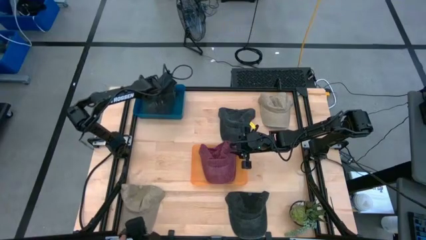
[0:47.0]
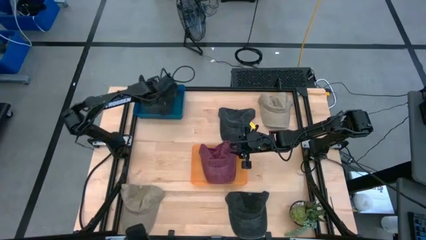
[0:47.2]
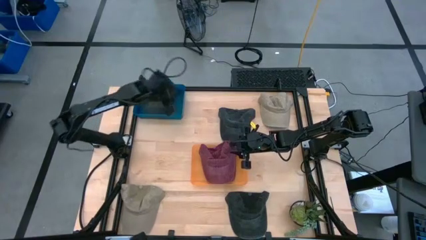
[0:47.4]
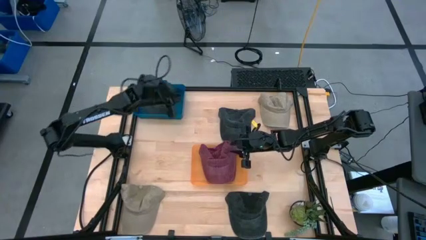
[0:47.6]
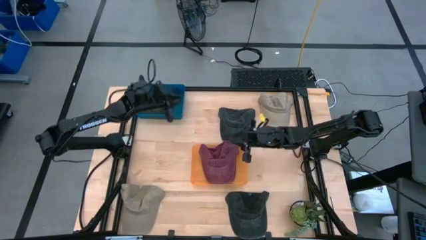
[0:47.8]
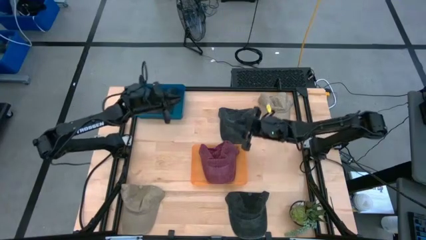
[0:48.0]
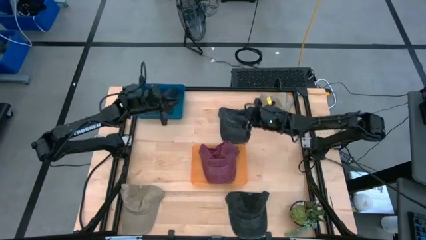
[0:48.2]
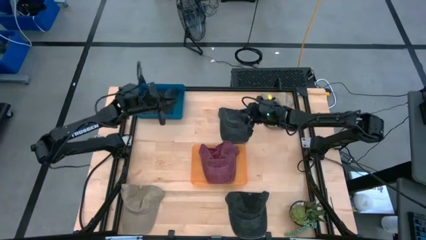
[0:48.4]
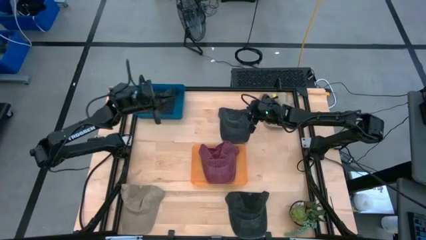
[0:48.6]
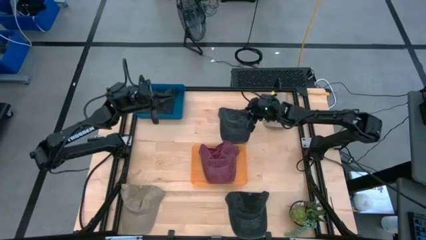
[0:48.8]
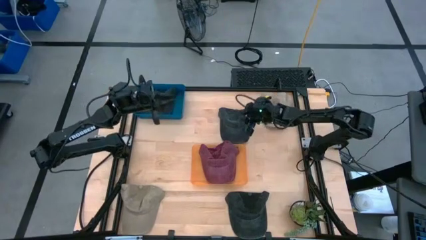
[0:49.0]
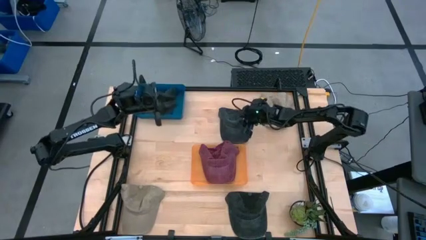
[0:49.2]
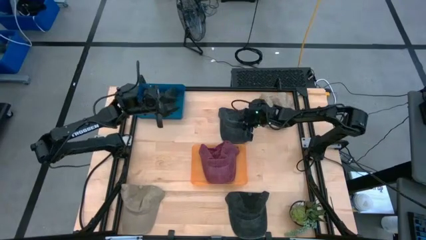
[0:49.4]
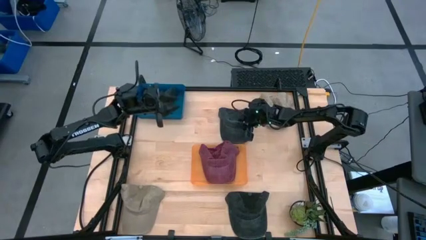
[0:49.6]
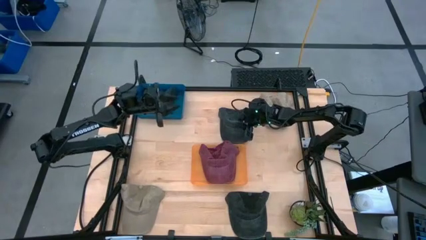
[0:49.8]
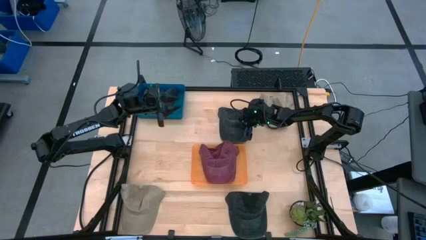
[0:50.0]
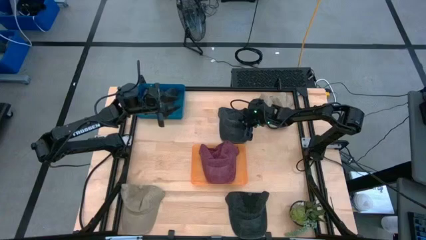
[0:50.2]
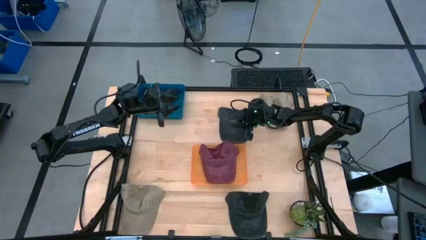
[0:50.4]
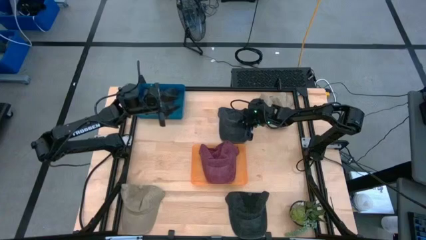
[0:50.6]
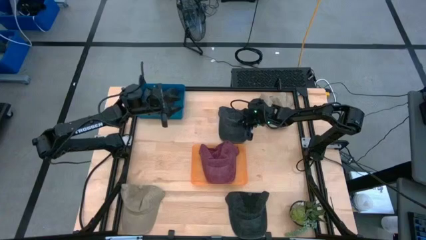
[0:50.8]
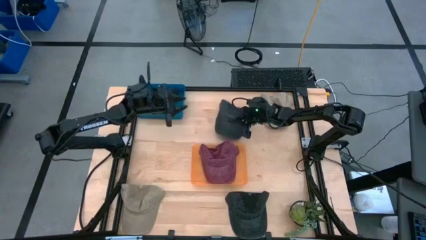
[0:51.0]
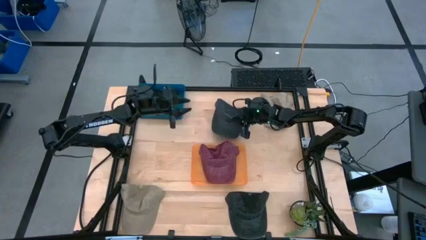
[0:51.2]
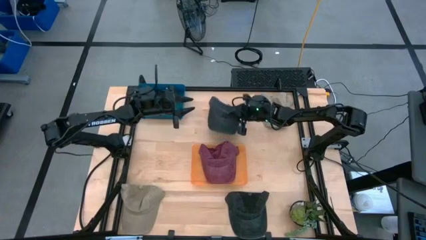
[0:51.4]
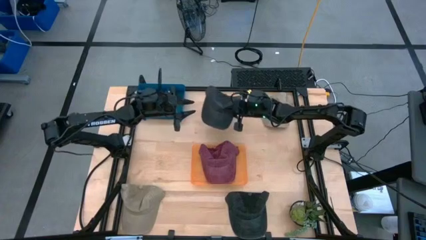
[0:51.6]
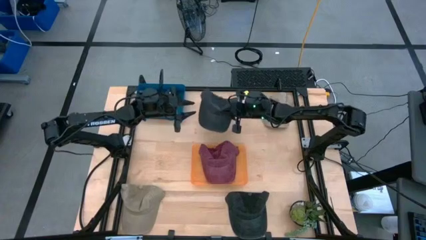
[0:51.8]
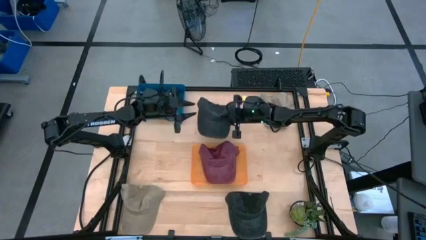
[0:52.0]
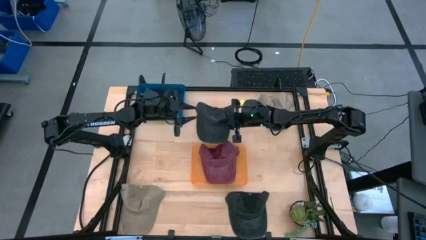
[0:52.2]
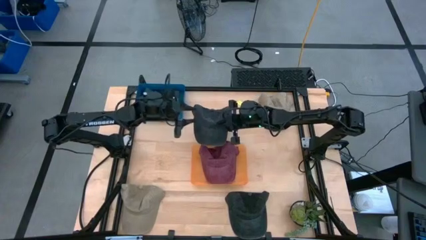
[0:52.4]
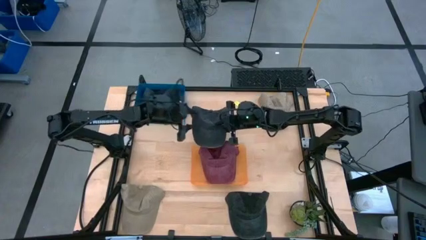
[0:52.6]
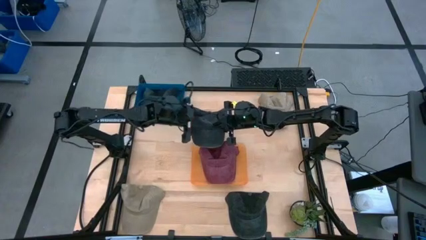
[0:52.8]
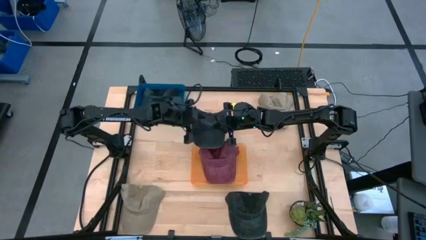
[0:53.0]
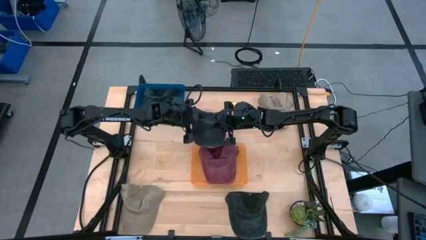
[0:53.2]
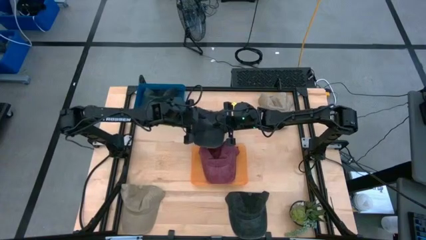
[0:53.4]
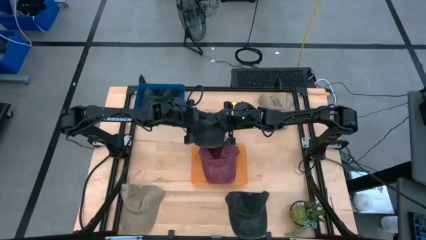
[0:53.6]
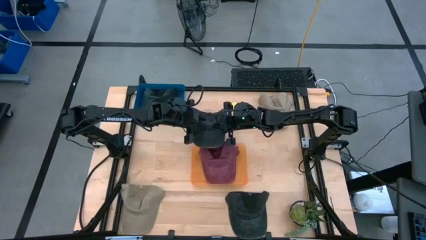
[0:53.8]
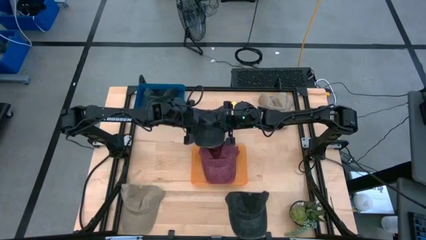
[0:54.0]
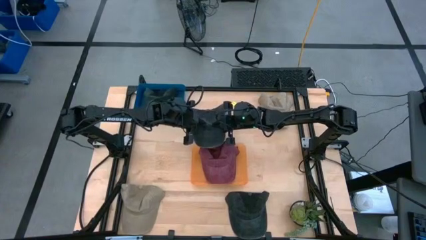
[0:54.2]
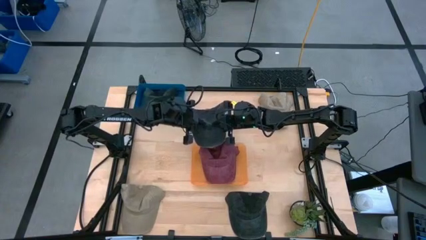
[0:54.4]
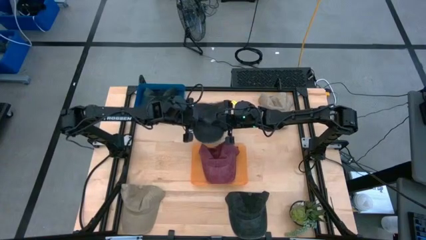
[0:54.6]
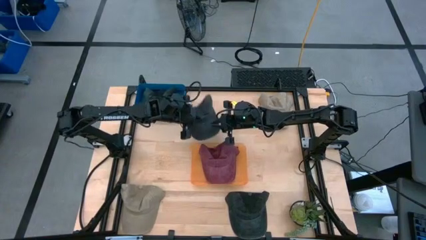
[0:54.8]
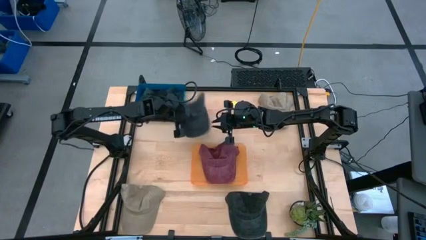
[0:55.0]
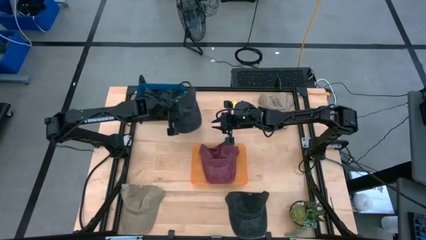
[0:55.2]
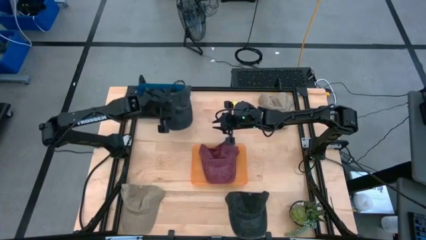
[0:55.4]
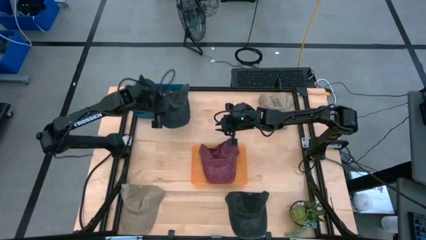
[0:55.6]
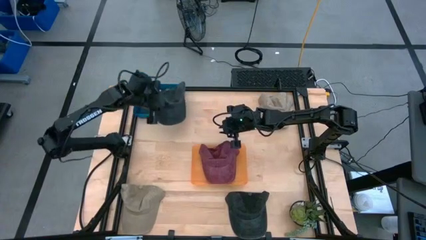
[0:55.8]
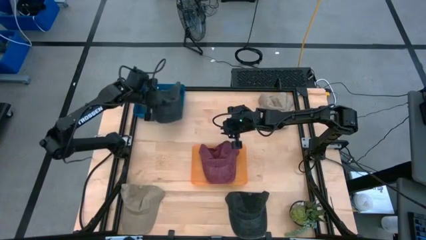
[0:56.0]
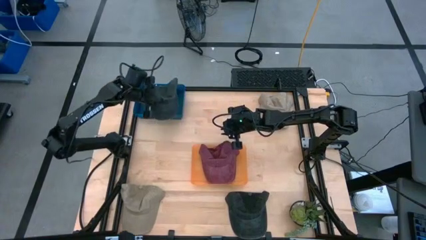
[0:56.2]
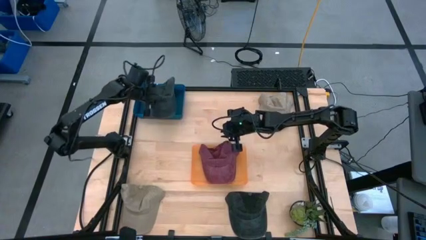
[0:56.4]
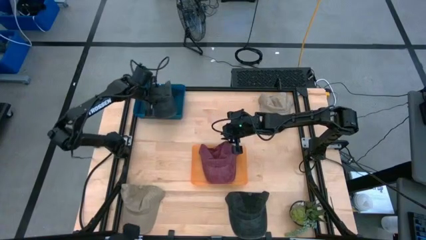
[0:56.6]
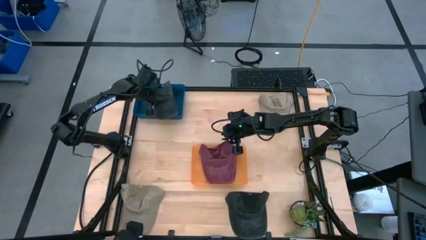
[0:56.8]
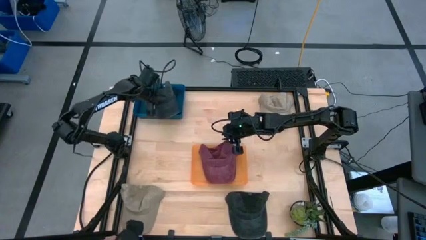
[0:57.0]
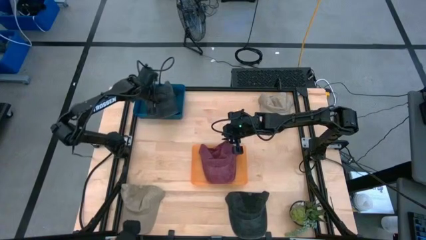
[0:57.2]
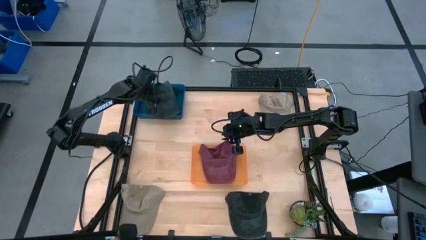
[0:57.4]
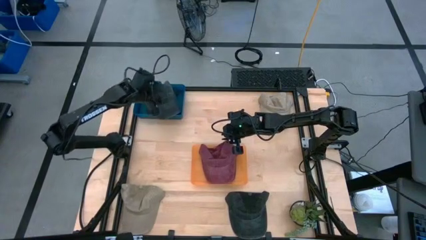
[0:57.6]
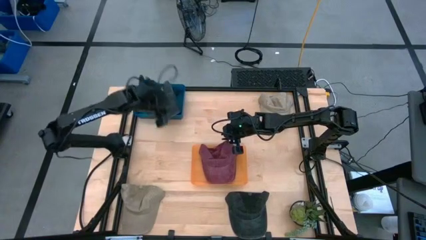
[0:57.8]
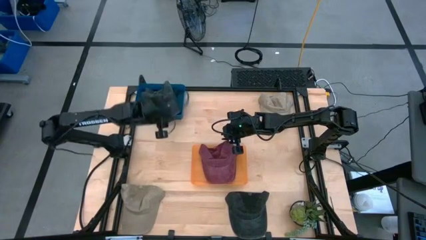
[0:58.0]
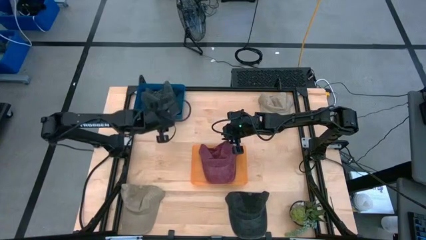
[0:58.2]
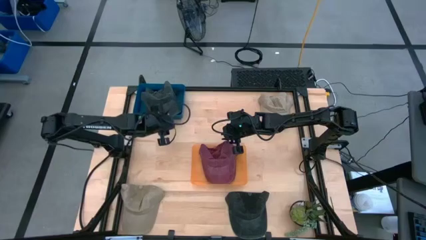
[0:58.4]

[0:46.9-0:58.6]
Task: Pick & Place hat
Put the top black cap into the blue bin

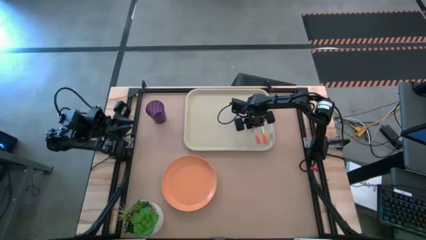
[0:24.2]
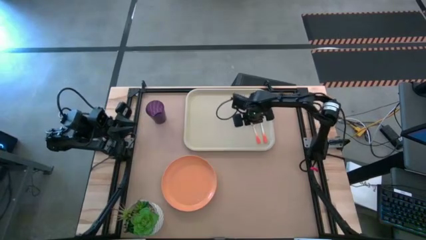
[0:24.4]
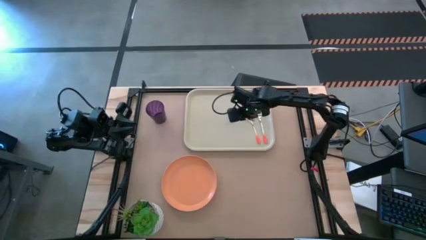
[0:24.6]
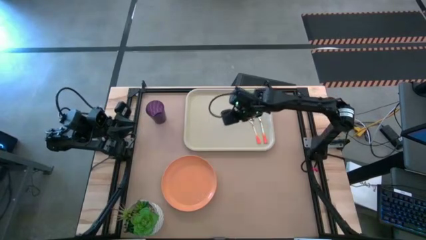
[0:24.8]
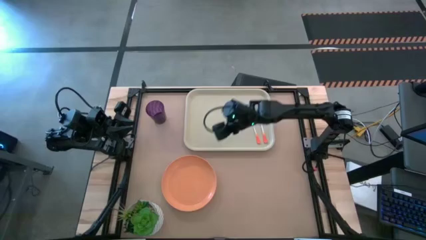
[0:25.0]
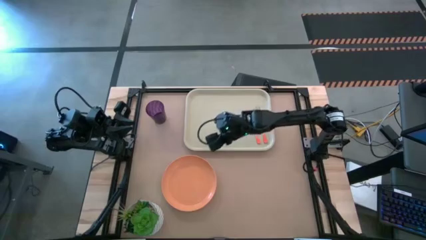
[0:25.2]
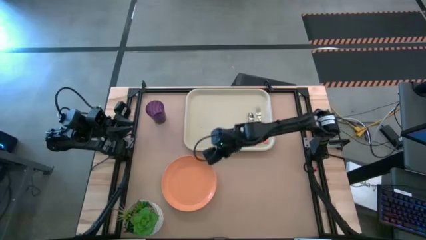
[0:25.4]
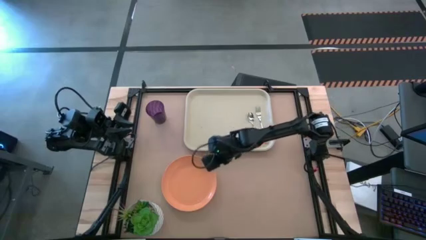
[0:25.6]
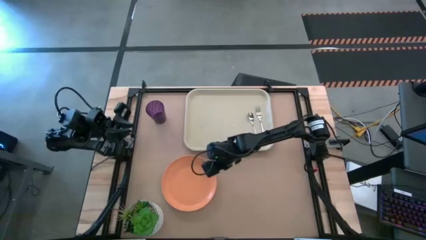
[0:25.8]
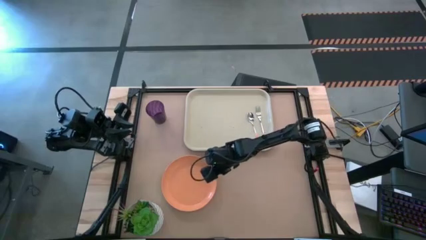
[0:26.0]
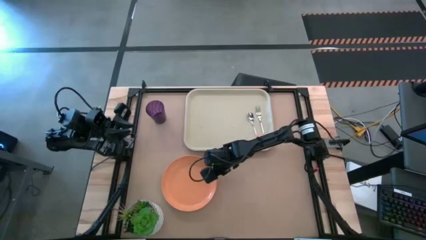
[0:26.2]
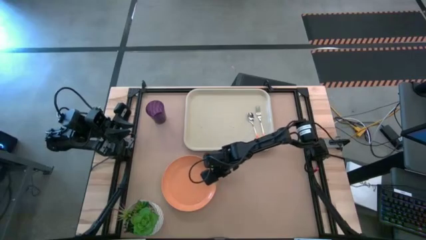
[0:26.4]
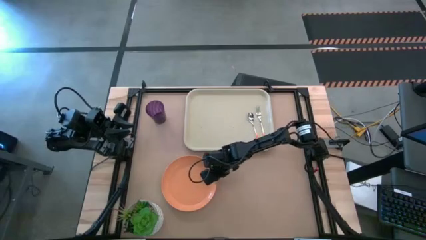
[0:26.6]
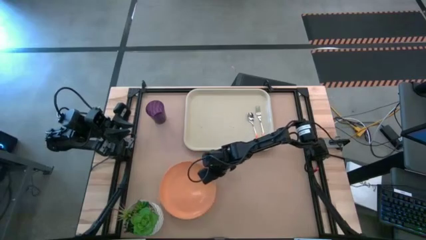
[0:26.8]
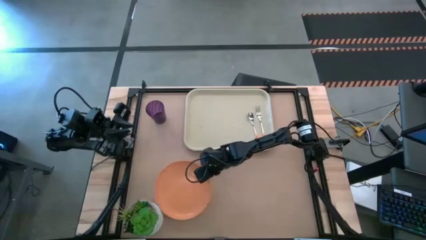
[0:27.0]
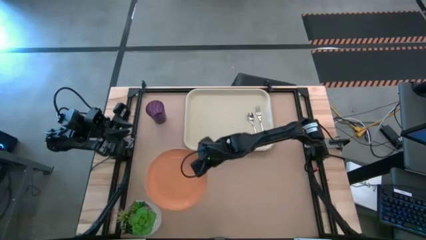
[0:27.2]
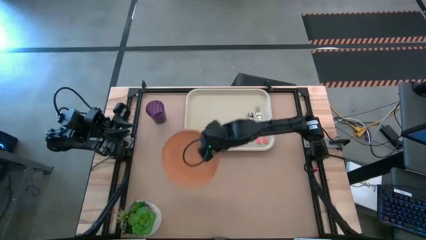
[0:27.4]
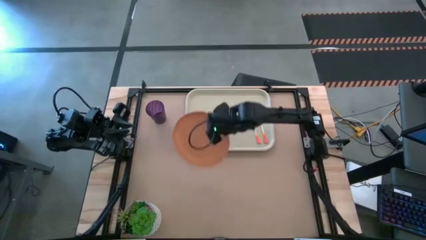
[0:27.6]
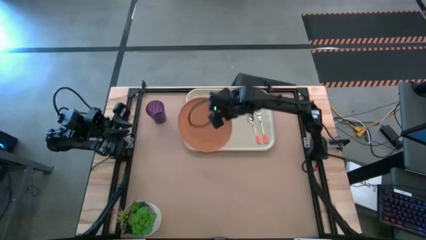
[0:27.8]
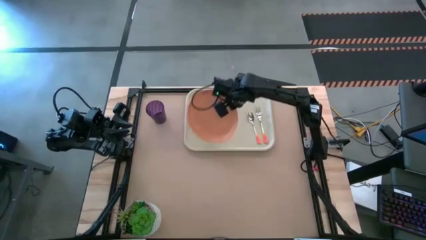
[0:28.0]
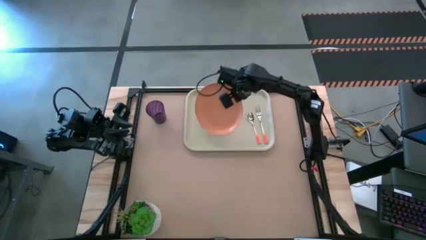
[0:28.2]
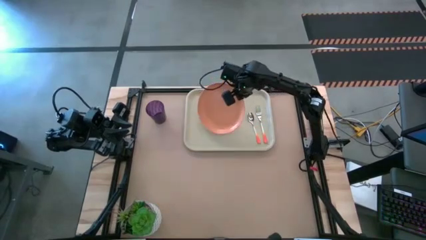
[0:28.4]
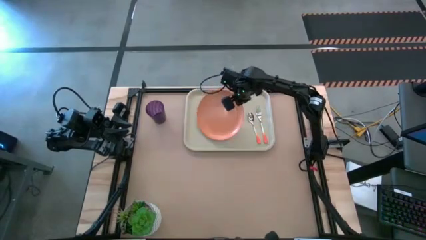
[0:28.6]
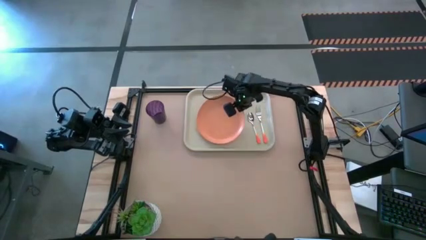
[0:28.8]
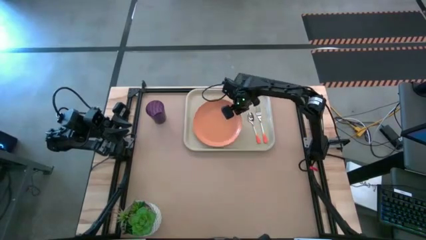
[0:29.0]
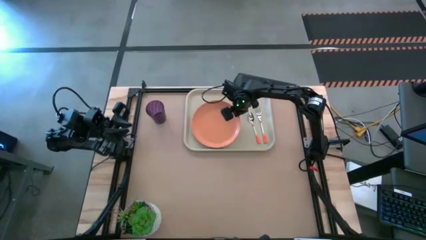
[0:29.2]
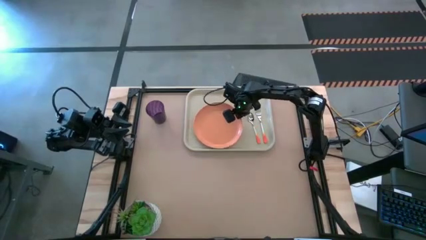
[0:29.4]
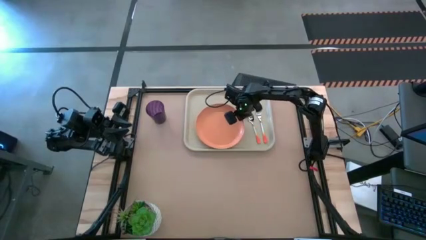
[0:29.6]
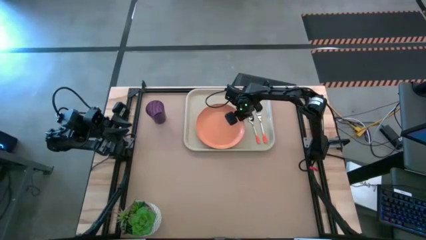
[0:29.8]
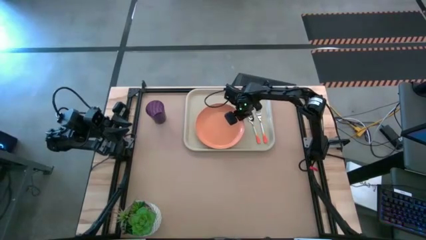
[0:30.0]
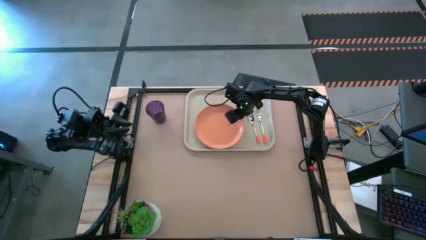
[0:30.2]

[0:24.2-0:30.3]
Task: Pick and place plate/cup/fork/spoon on tray
Put the orange plate to the left of the orange fork on the white tray
